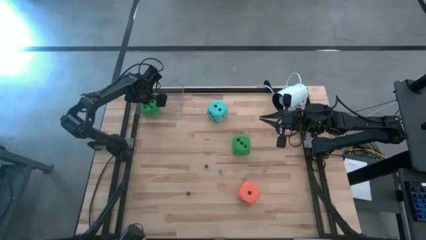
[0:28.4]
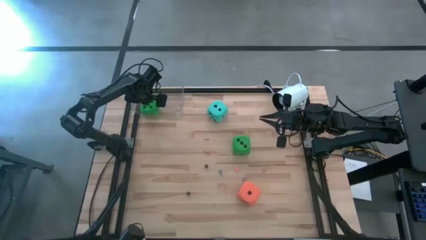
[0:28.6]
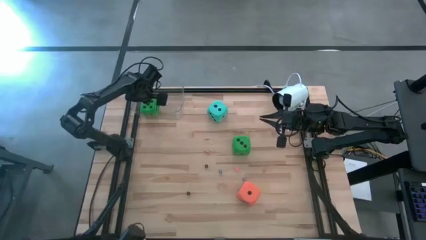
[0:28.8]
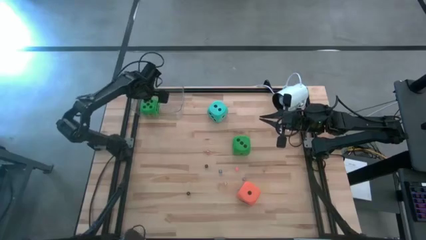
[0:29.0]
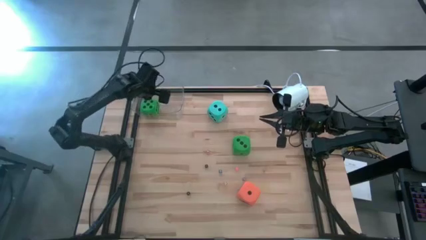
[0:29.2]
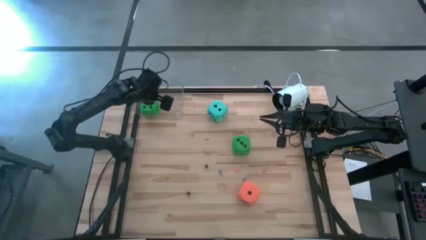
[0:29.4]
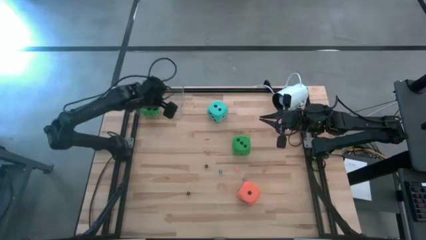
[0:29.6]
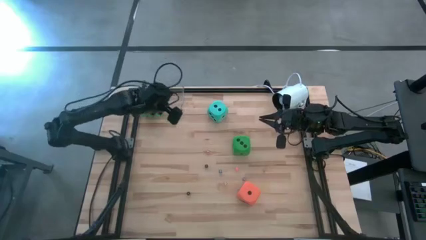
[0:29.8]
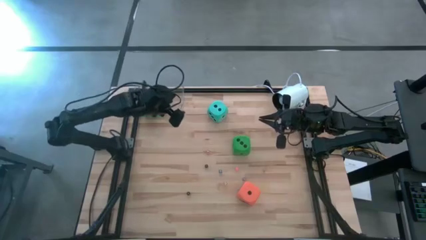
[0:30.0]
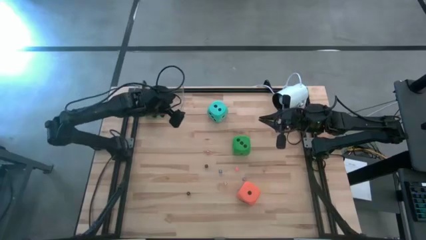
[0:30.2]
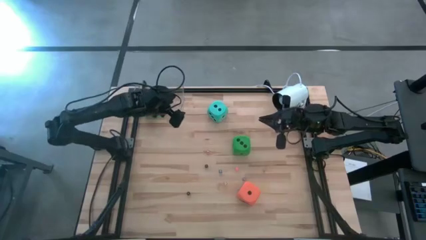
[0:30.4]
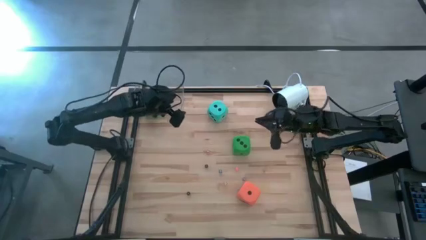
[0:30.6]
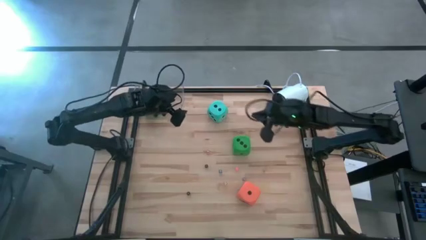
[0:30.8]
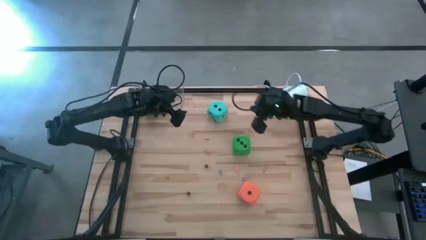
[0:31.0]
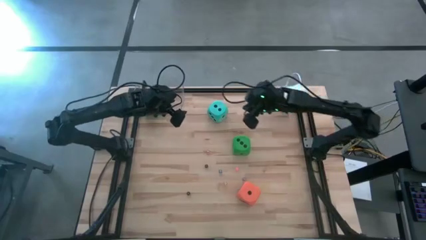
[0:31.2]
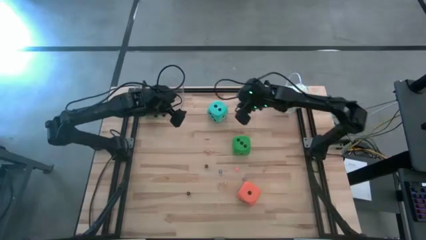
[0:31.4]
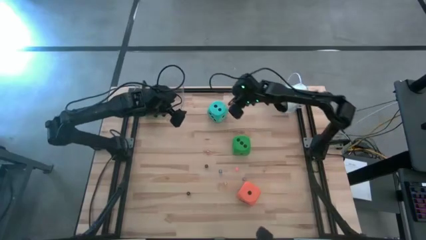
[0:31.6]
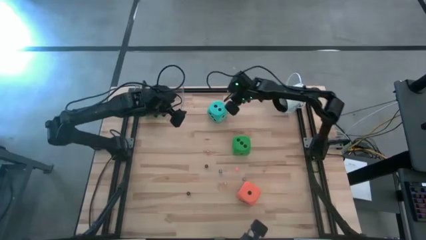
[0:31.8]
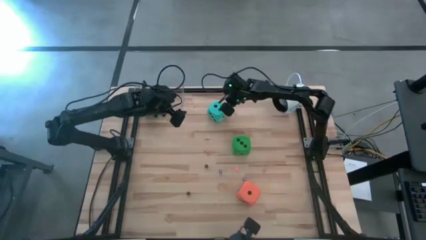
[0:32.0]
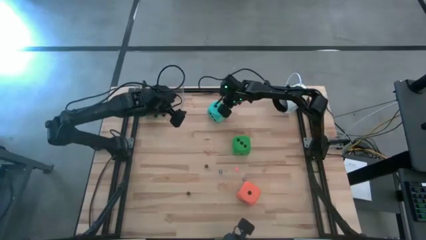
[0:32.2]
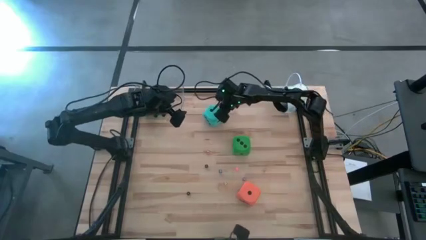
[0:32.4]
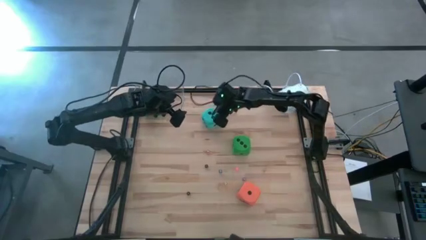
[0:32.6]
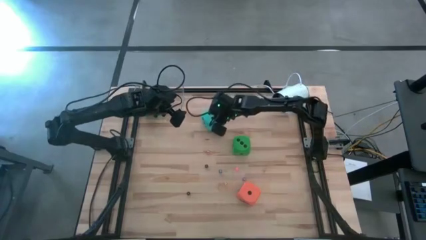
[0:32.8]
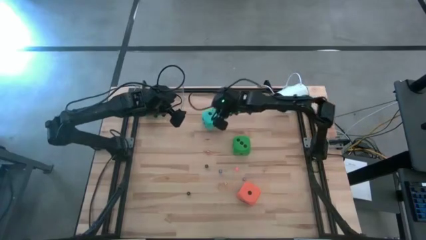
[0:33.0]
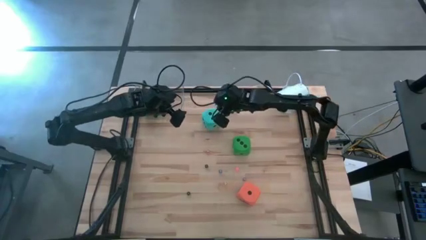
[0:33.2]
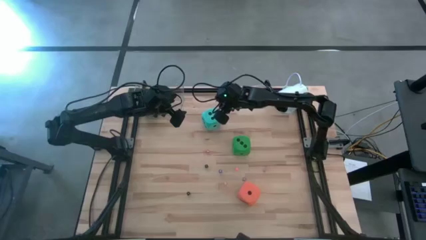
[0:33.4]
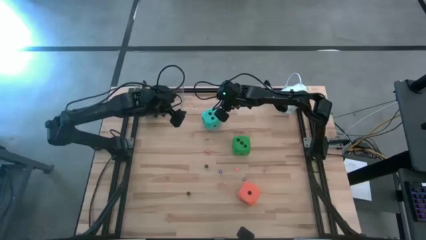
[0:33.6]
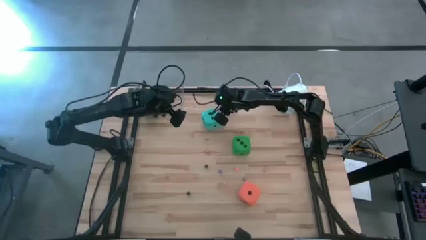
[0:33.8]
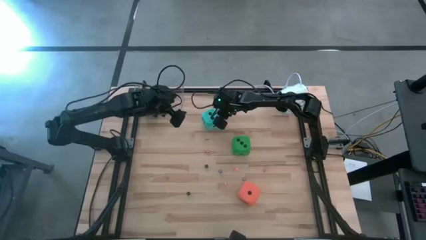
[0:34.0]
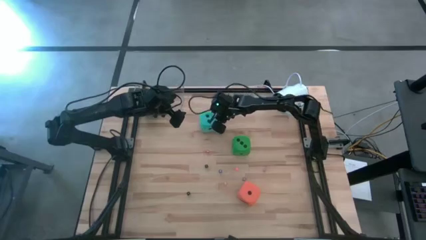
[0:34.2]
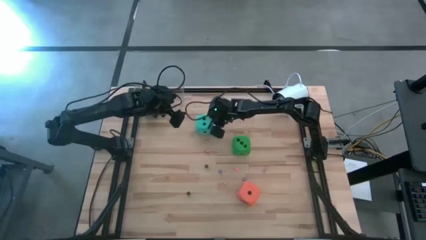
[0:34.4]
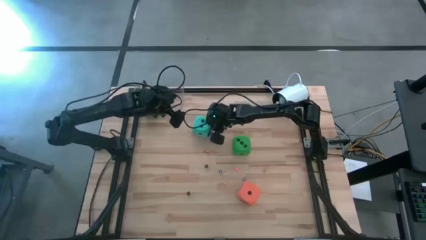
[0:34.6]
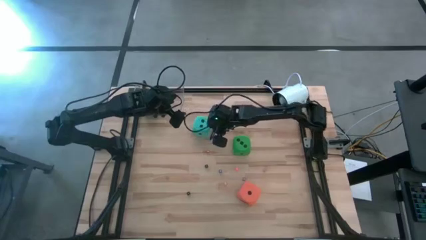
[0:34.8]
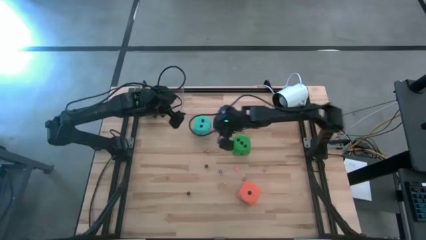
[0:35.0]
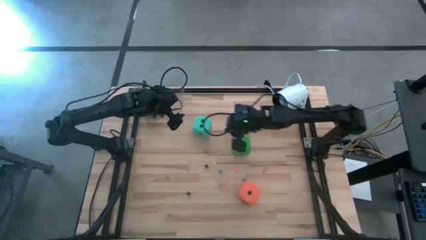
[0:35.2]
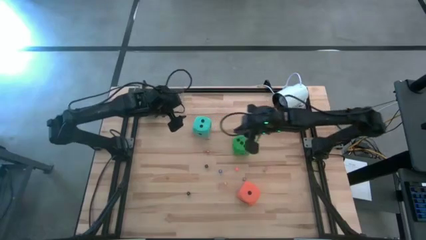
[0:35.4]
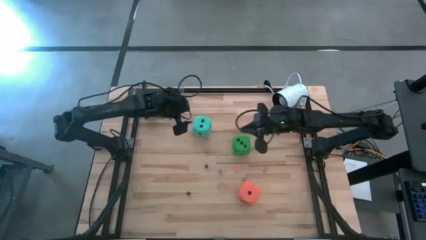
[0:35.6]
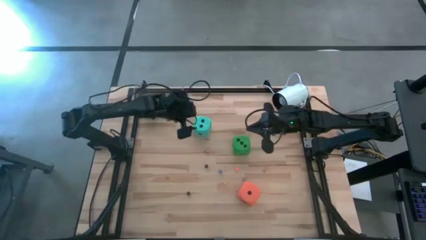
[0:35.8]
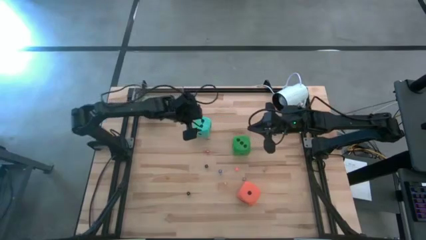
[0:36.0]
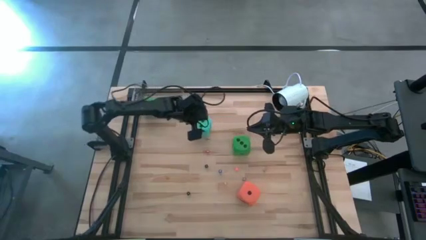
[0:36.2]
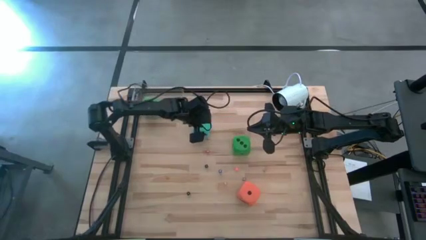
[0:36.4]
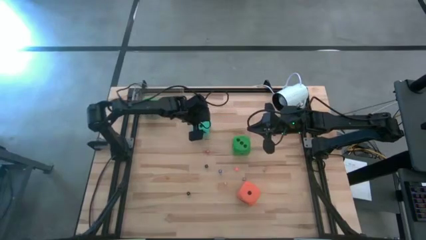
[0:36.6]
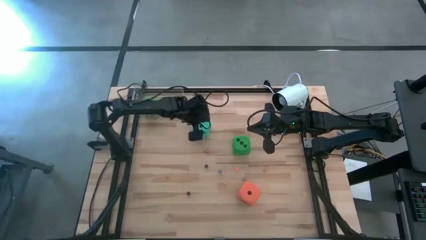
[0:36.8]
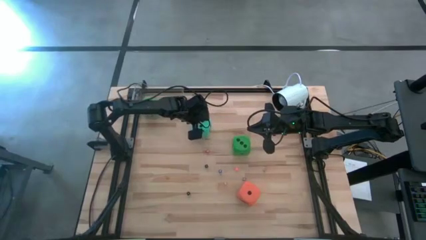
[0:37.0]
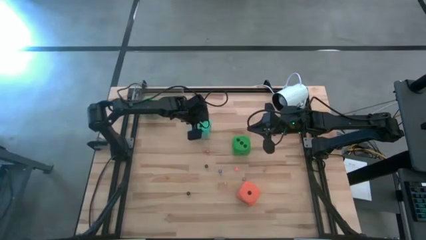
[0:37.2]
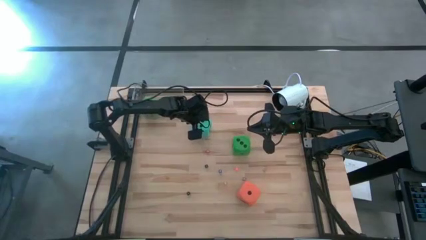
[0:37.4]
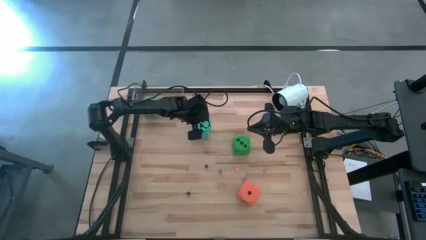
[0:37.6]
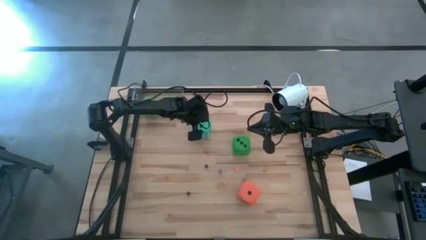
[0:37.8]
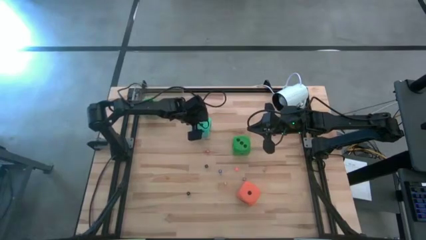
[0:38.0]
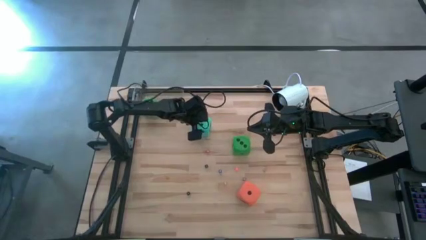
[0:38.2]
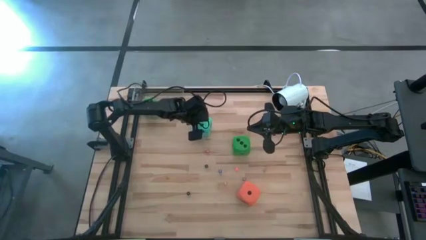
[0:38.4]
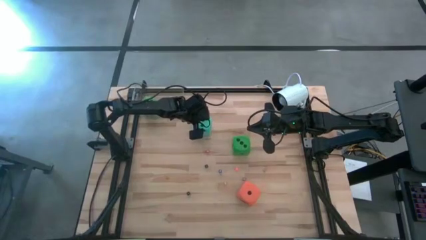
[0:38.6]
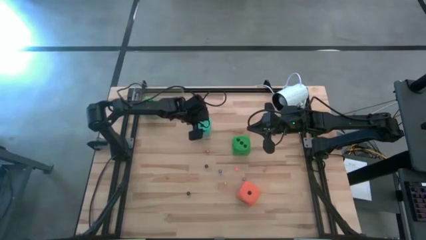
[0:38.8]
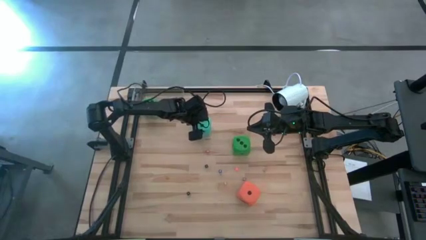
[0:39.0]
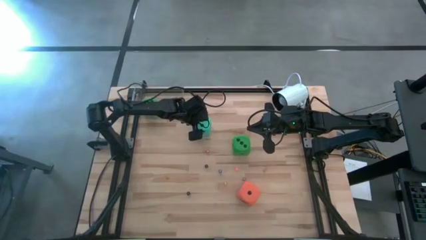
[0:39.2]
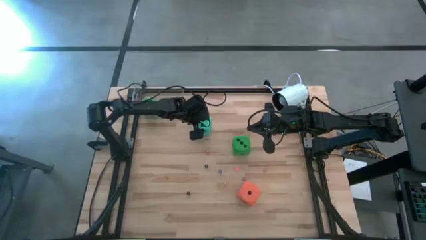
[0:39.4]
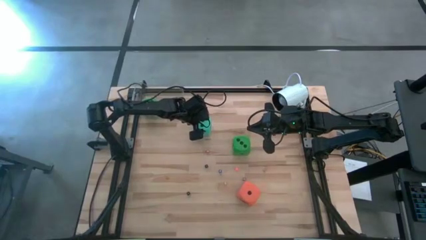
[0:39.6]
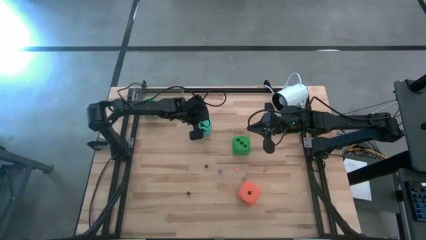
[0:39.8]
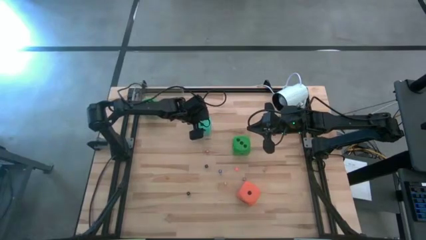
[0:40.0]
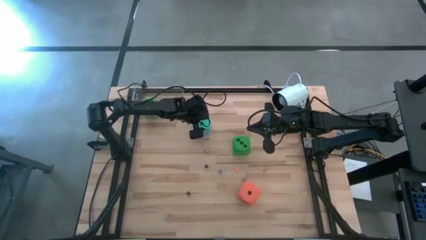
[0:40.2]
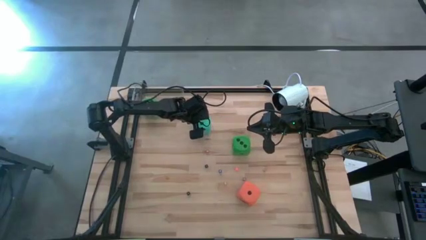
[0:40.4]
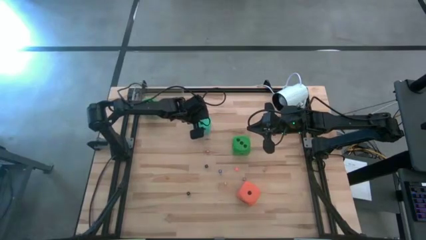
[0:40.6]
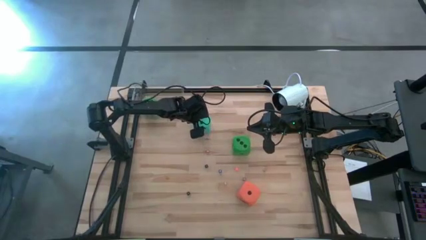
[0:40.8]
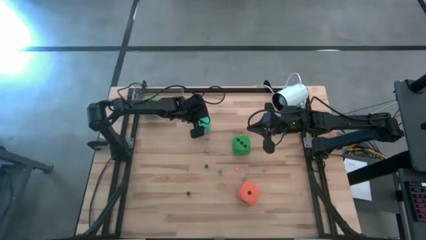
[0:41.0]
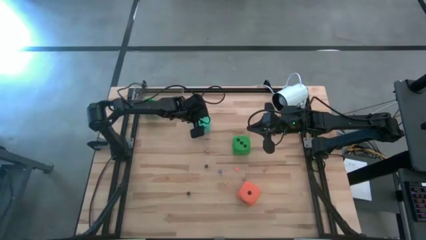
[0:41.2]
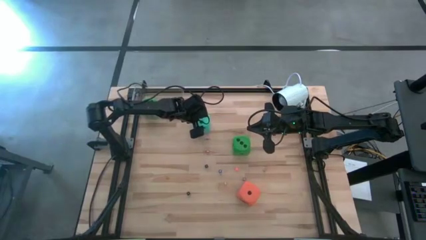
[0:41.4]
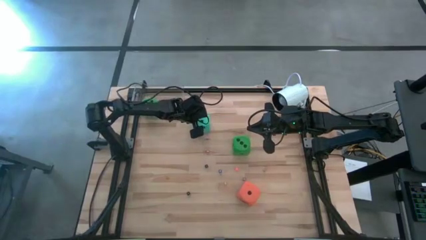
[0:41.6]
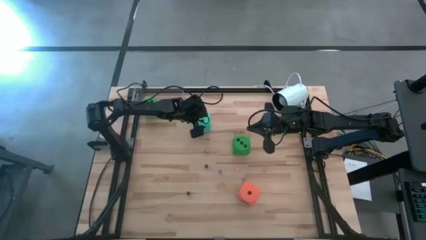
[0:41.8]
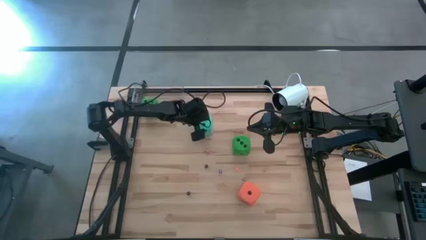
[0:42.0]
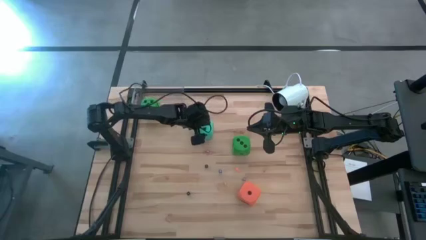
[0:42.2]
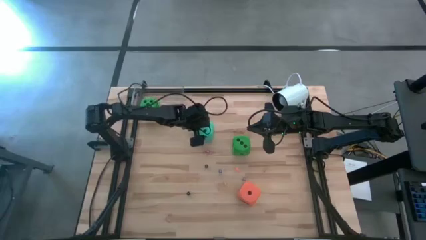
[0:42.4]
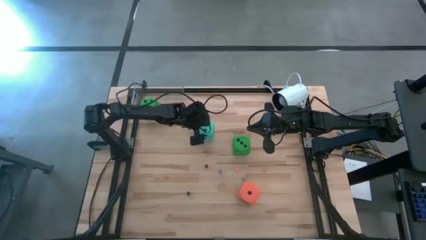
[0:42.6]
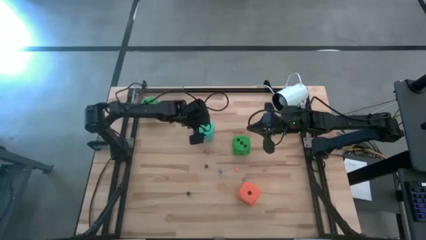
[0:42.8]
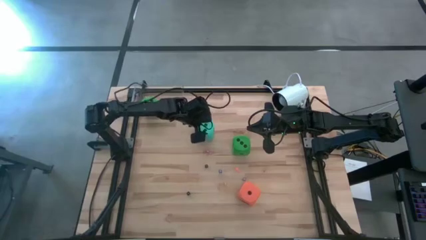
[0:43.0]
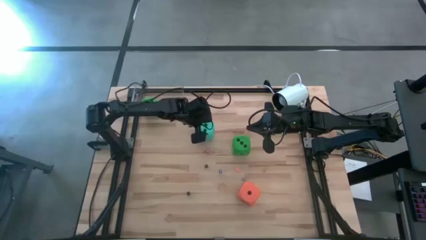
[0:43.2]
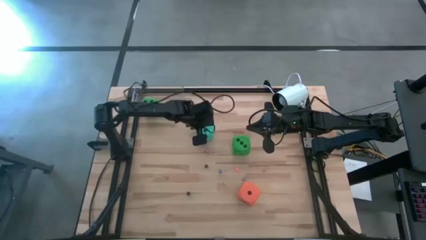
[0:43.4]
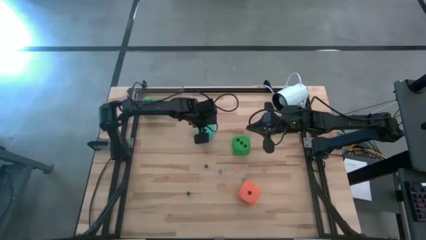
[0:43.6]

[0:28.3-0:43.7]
Task: Pick & Place Dice
Put the large blue die into the transparent bin

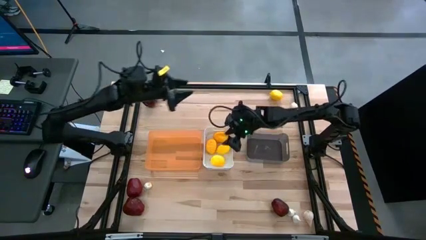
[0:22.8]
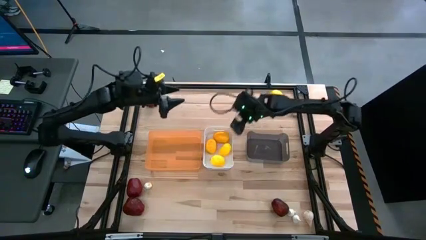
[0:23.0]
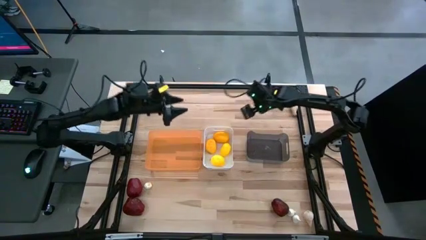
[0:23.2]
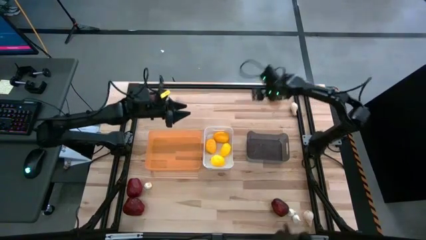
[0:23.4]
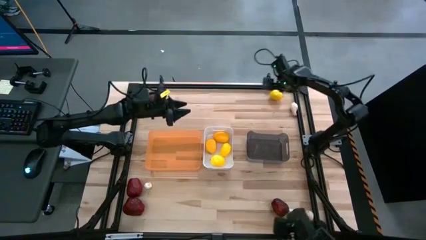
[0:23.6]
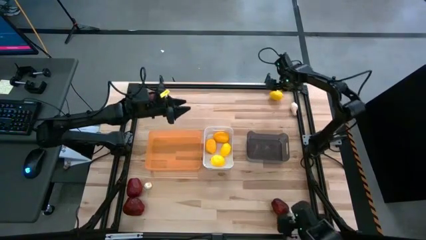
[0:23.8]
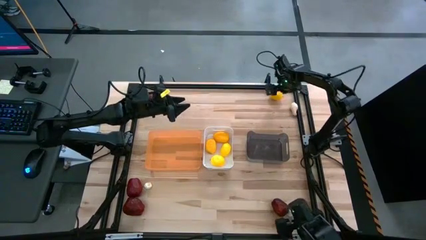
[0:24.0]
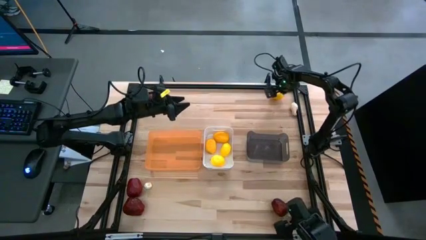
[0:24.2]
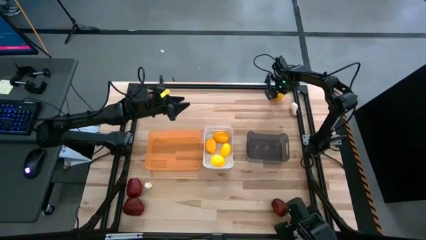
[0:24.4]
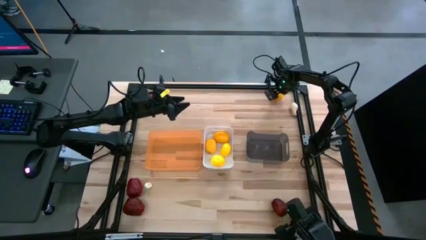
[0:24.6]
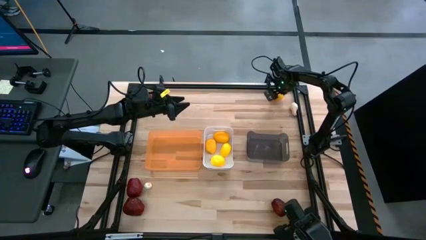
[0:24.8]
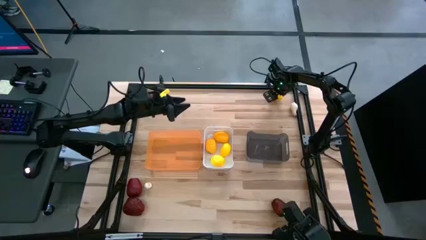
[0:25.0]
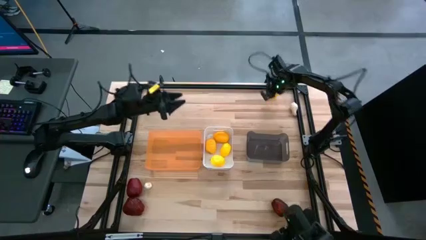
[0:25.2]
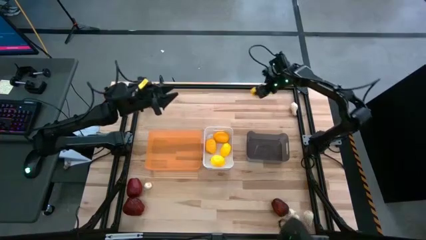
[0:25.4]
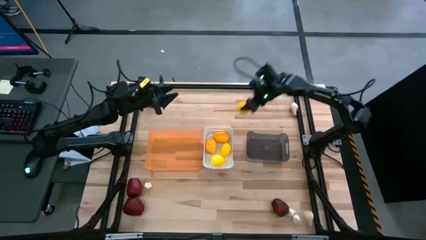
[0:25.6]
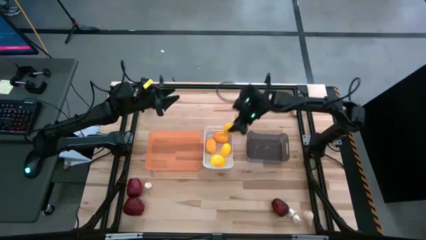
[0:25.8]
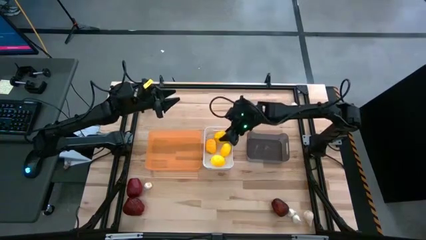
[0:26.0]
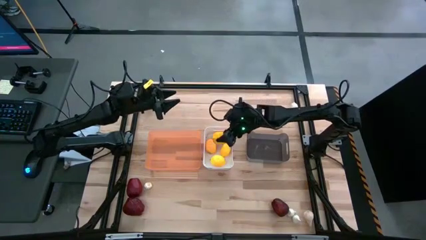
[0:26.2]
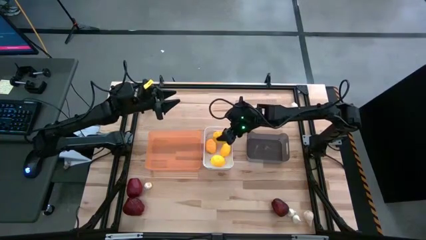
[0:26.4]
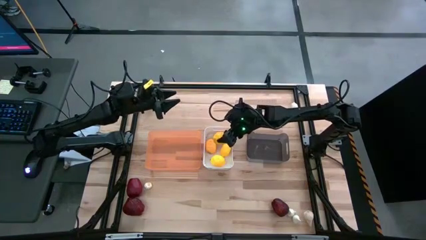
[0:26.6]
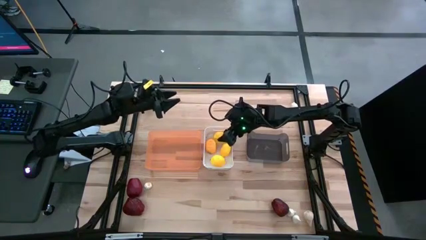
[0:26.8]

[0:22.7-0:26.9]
Task: Sort produce into baskets
Put the yellow lemon into the white bin
